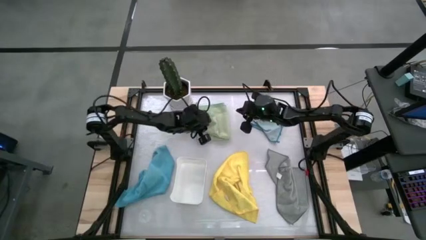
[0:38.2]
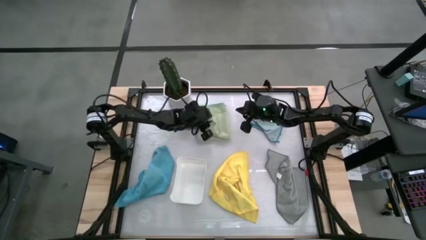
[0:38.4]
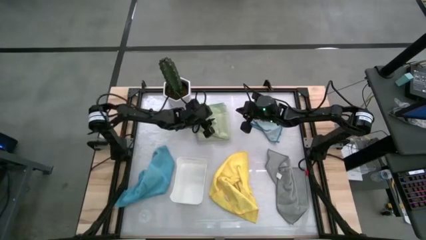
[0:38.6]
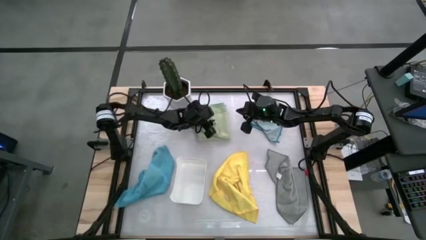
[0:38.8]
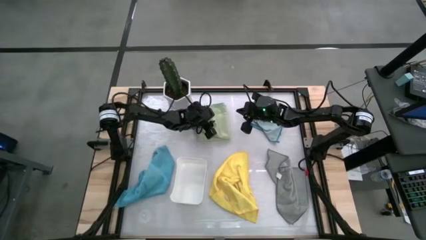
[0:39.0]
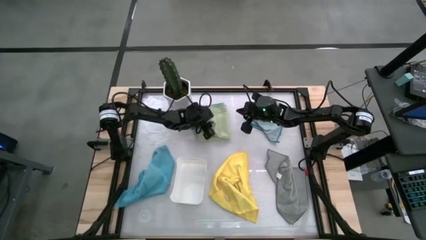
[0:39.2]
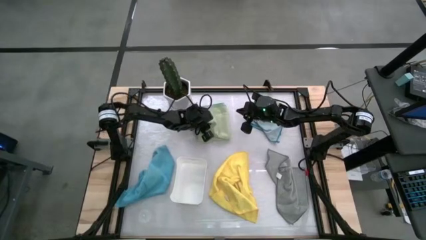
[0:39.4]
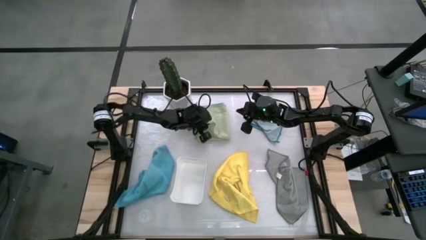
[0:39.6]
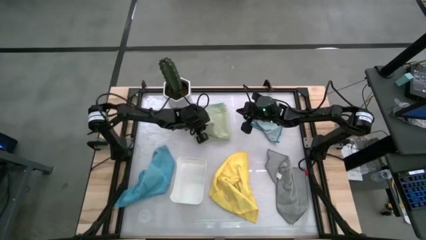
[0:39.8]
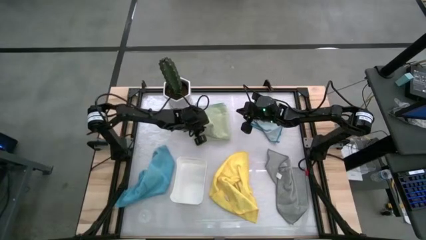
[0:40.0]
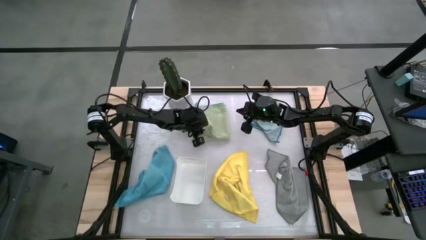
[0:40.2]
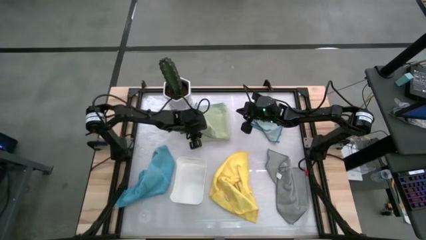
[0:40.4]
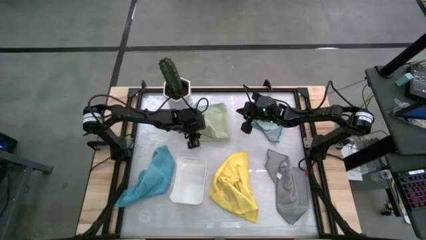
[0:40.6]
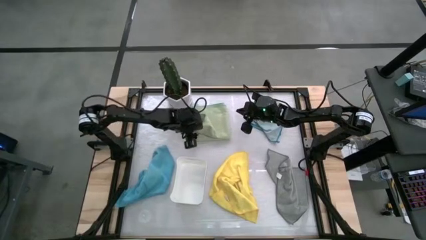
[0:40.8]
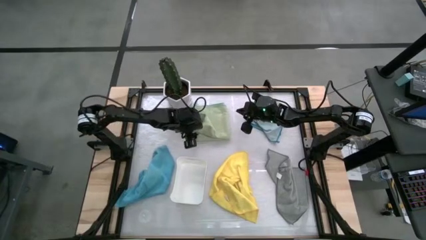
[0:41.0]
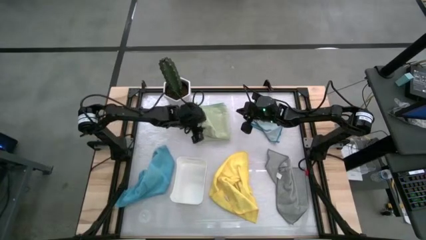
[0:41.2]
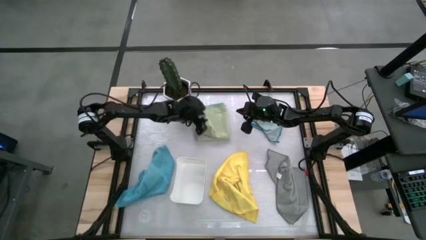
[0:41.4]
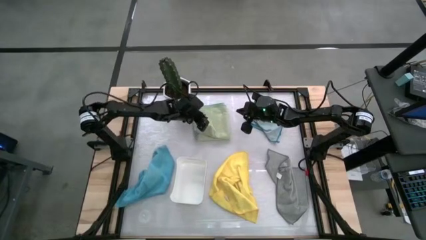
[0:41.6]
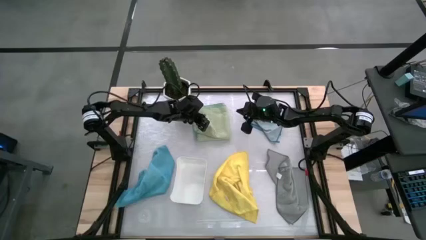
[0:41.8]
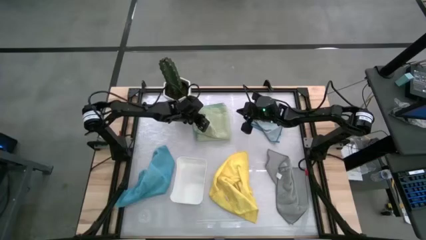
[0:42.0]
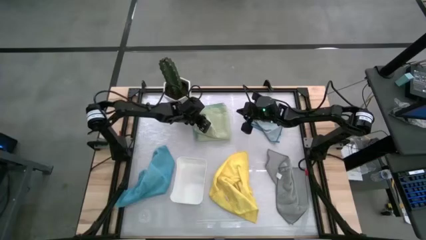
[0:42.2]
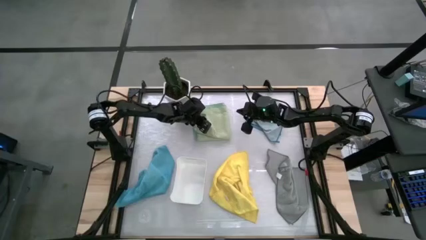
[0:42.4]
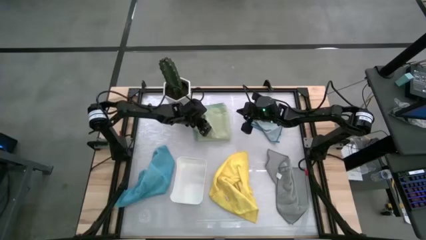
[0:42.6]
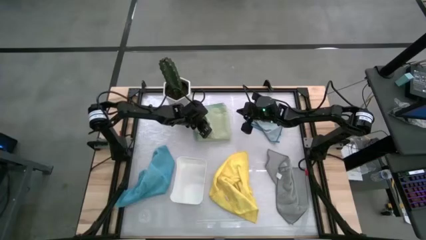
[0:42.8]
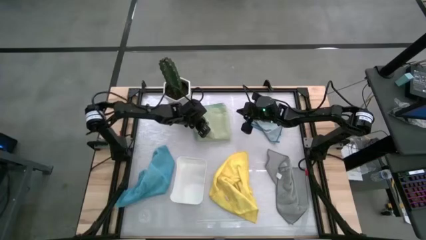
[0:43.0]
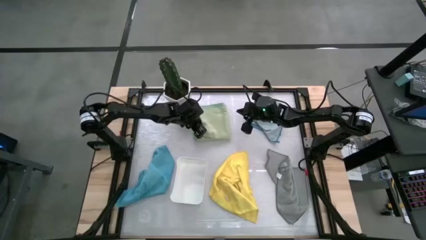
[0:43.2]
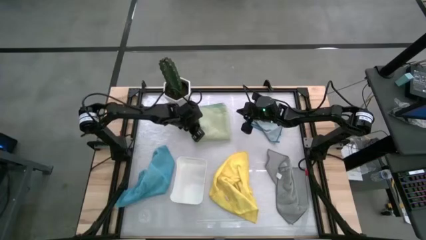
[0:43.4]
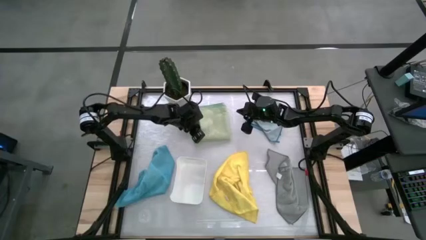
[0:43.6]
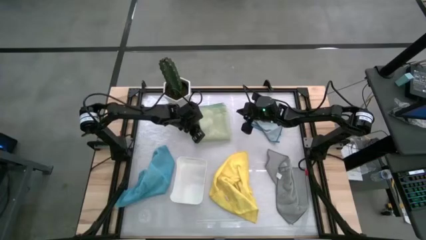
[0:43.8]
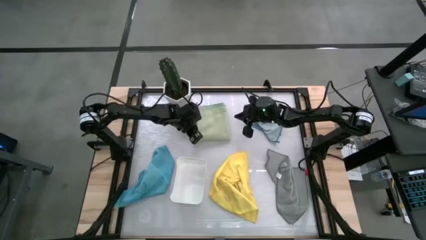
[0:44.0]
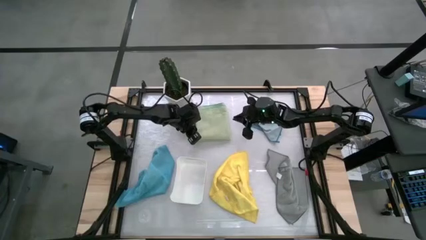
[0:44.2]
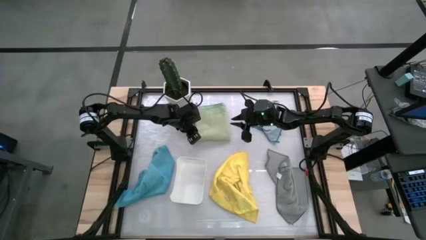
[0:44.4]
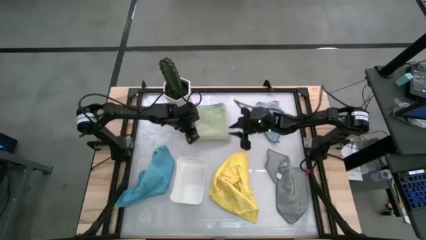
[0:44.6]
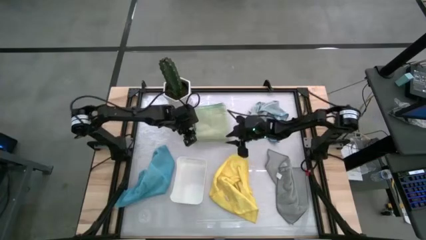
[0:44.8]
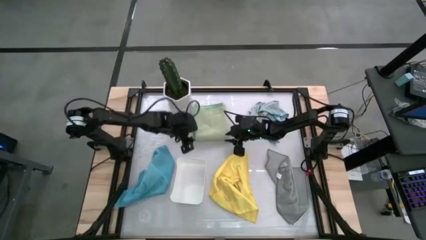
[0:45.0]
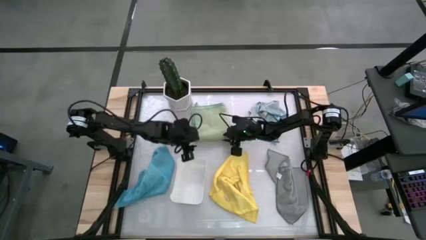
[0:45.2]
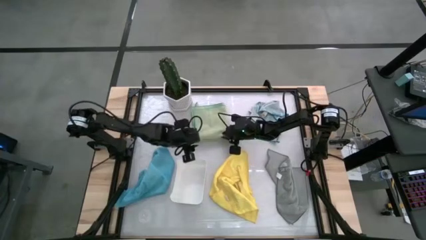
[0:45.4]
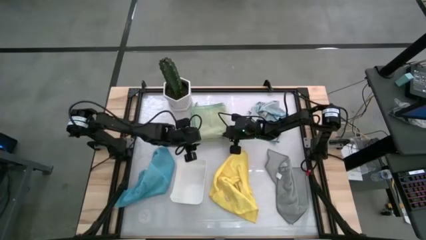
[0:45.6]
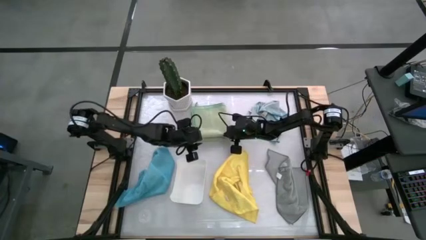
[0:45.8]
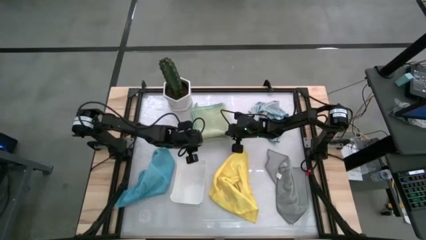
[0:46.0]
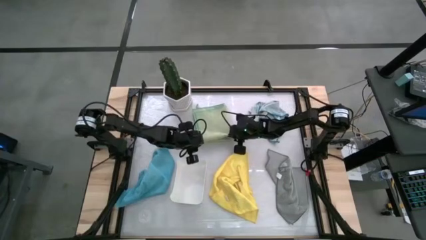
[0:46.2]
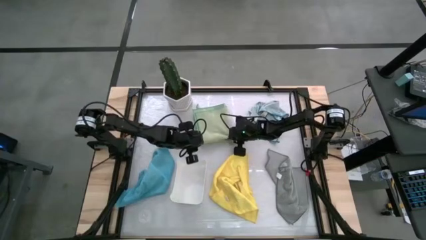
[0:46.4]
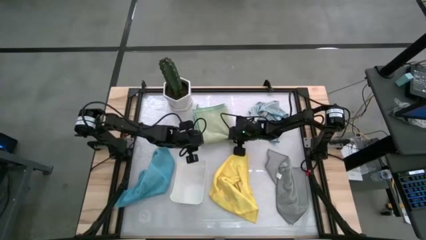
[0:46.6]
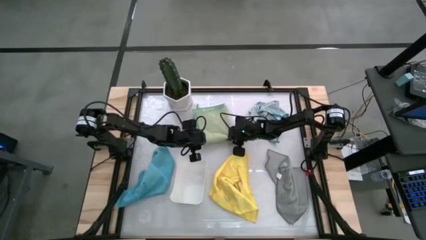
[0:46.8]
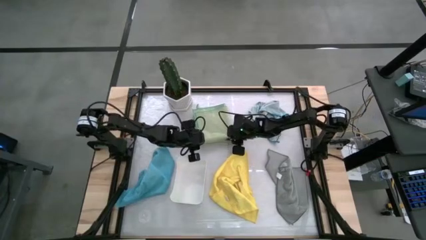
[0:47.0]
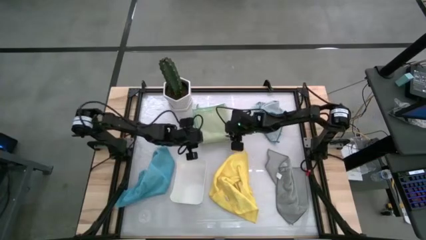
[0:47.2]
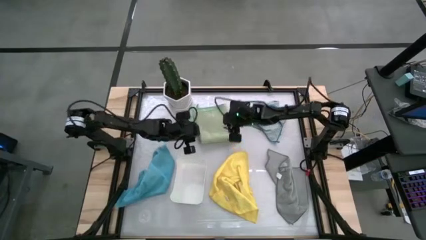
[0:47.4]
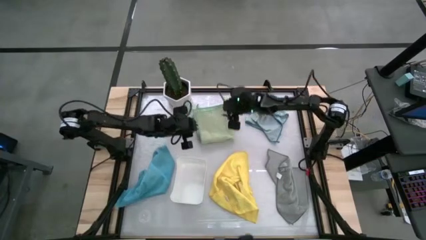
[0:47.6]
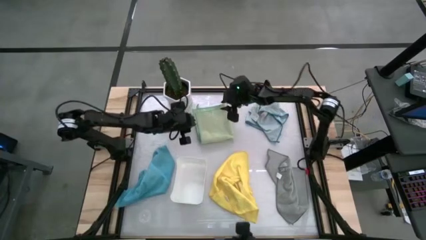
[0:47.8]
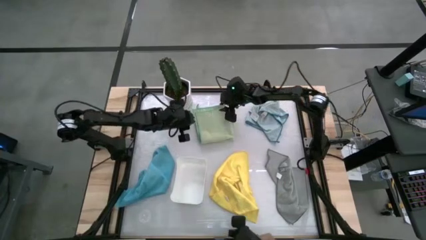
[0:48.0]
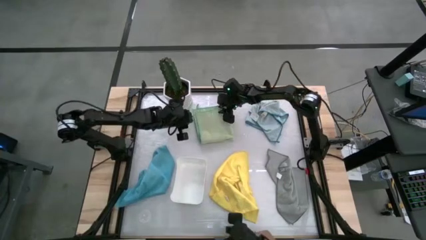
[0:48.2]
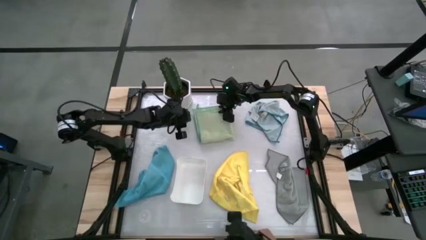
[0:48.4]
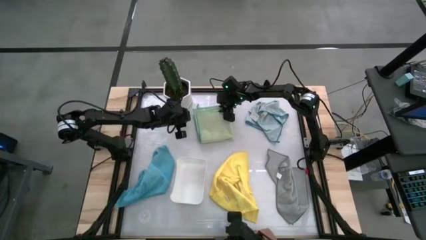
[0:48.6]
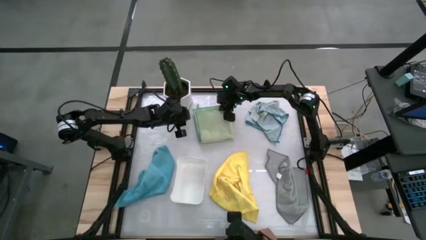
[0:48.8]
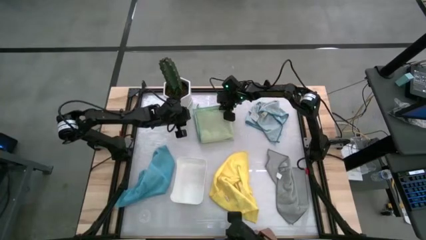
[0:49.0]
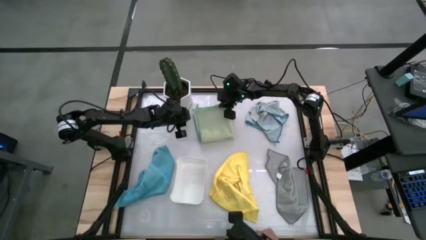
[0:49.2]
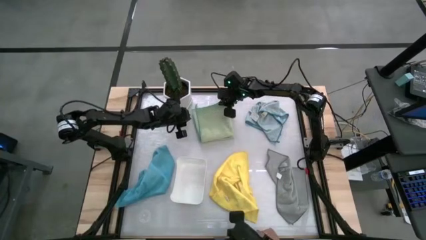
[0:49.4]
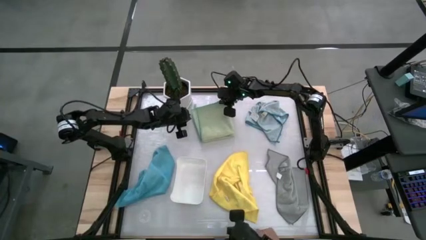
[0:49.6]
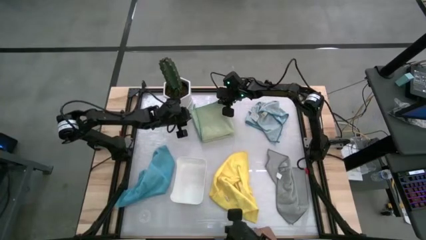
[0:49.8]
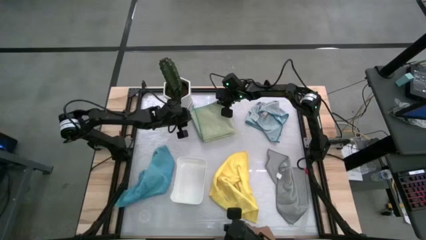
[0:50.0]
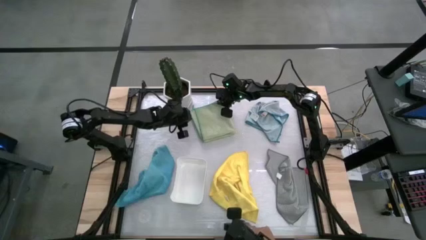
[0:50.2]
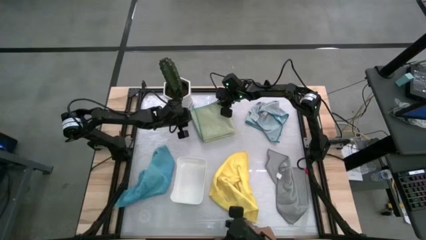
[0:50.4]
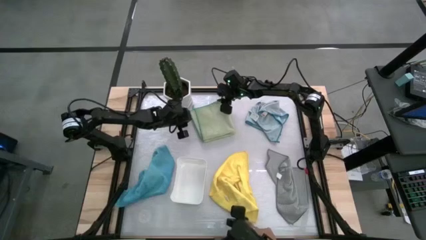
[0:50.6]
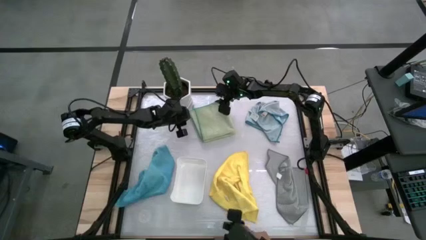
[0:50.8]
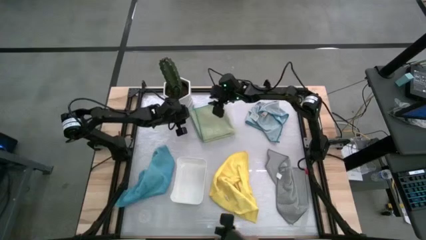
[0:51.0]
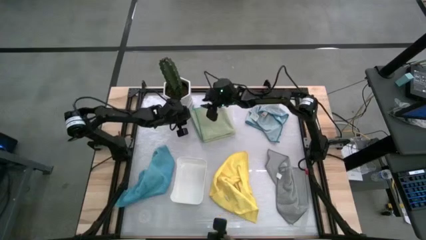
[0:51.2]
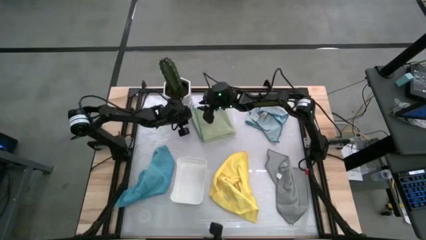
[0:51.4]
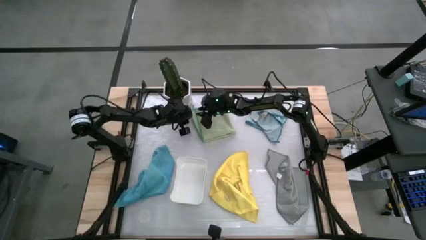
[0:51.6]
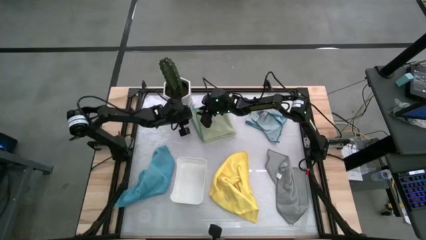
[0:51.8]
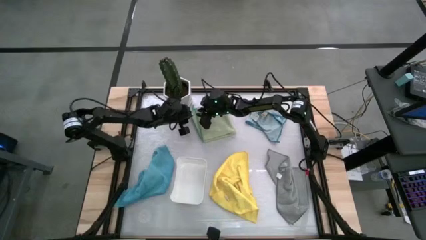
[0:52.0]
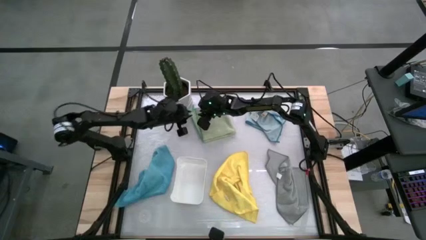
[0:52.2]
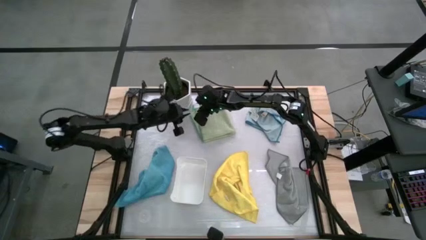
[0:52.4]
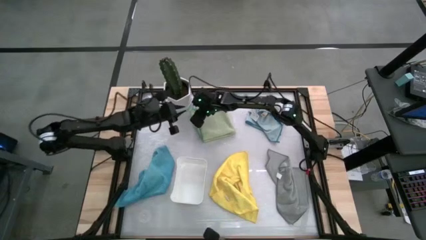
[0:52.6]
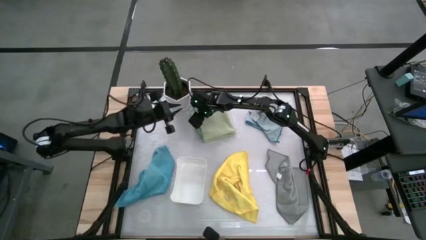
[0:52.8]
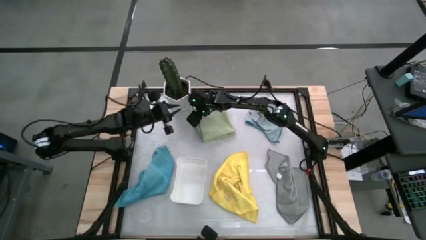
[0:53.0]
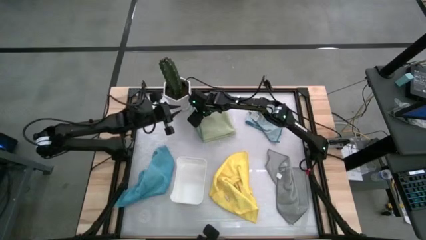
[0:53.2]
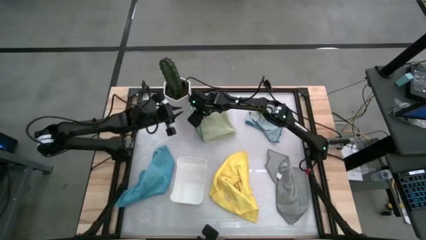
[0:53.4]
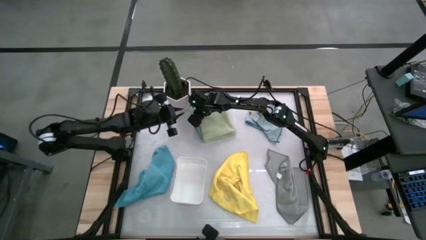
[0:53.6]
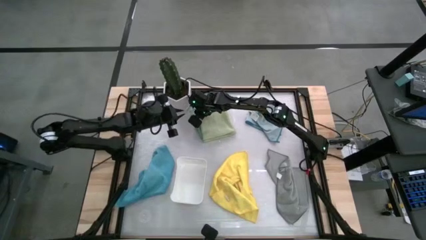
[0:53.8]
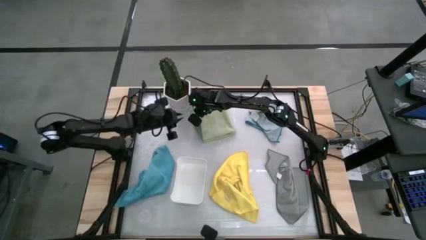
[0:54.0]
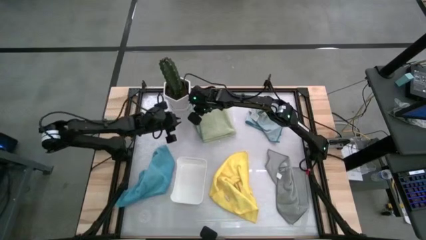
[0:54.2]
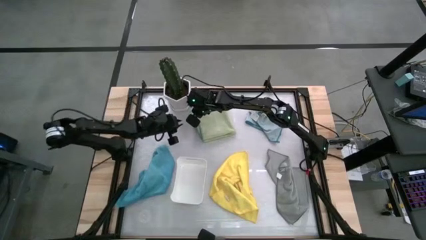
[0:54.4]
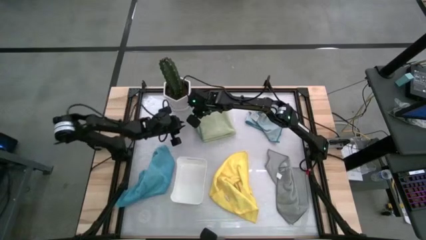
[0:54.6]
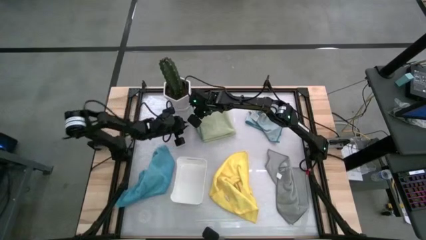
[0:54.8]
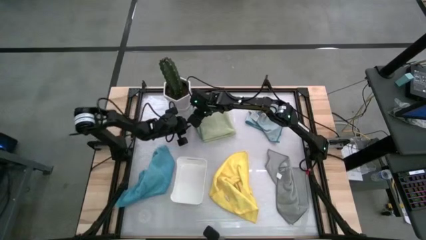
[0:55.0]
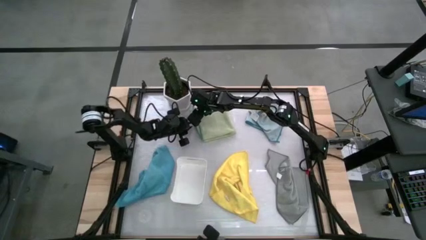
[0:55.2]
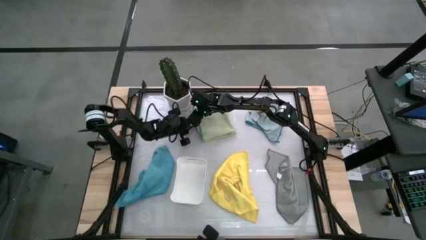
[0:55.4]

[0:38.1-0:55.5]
Task: Fold microfiber towels
Fold the green microfiber towel
